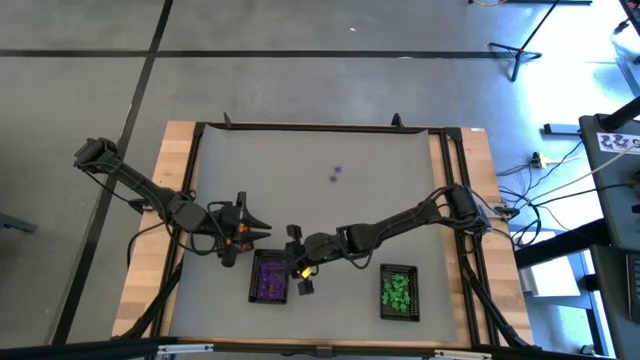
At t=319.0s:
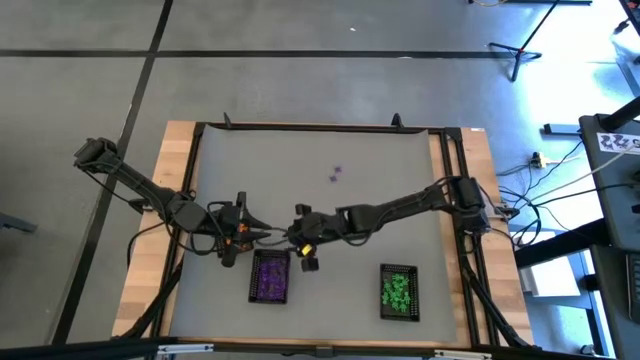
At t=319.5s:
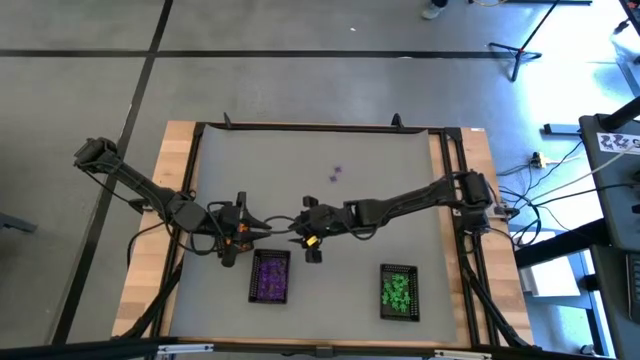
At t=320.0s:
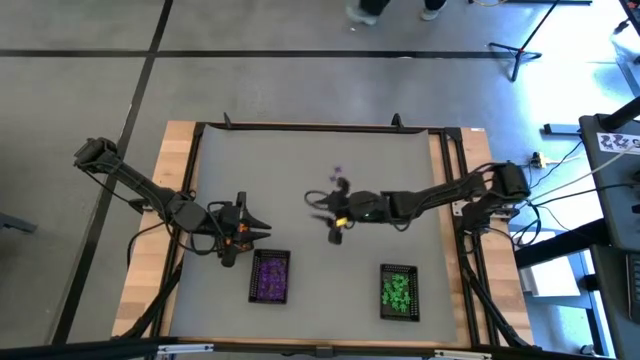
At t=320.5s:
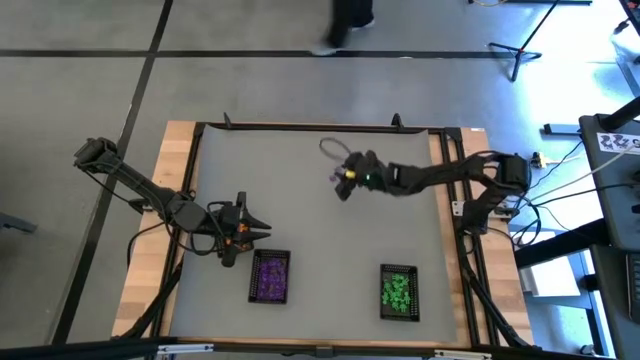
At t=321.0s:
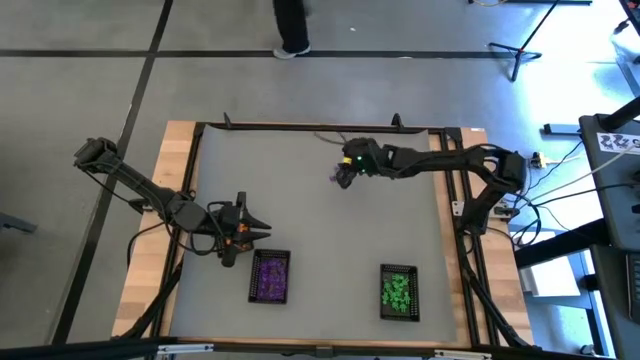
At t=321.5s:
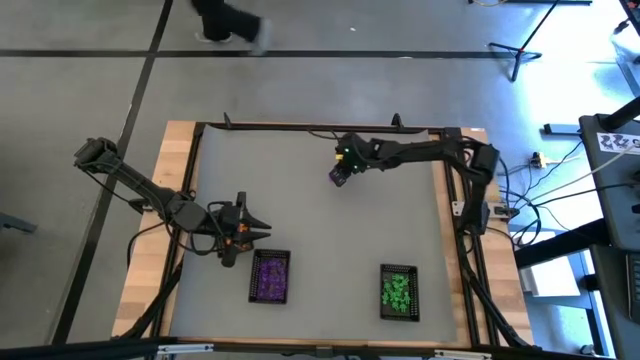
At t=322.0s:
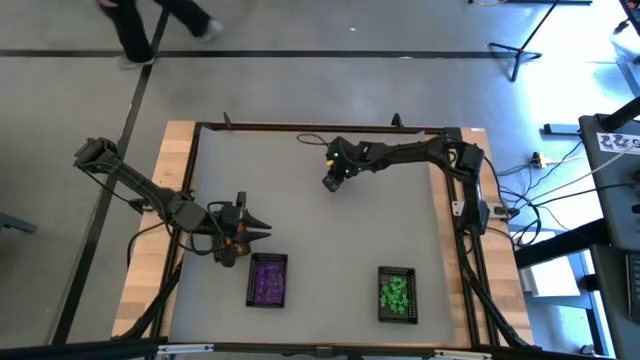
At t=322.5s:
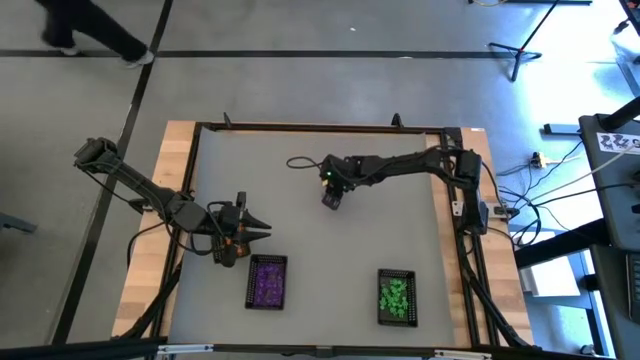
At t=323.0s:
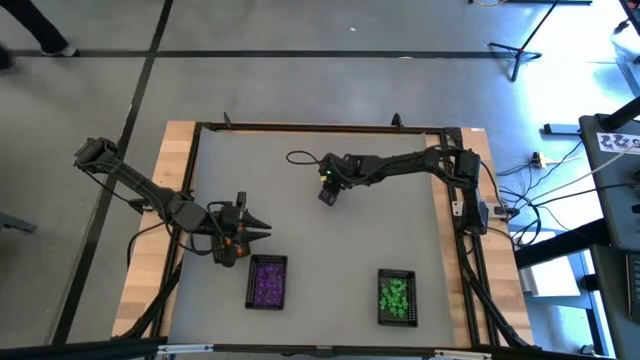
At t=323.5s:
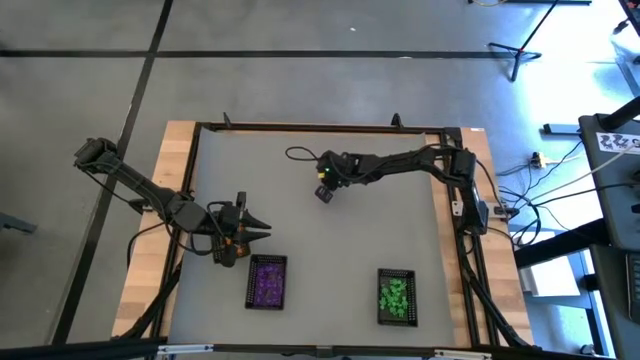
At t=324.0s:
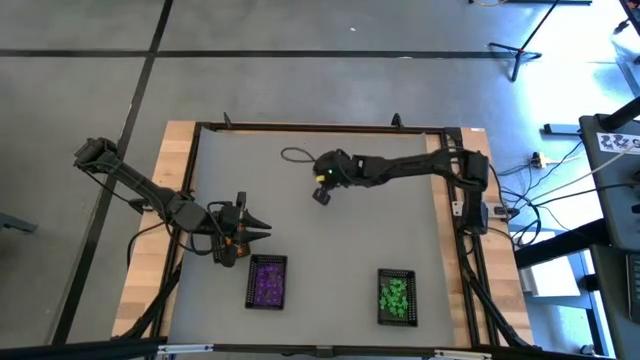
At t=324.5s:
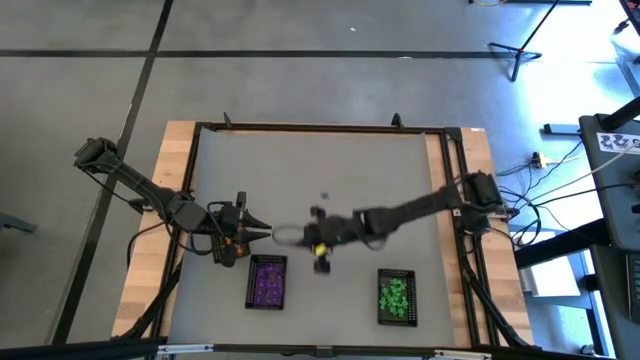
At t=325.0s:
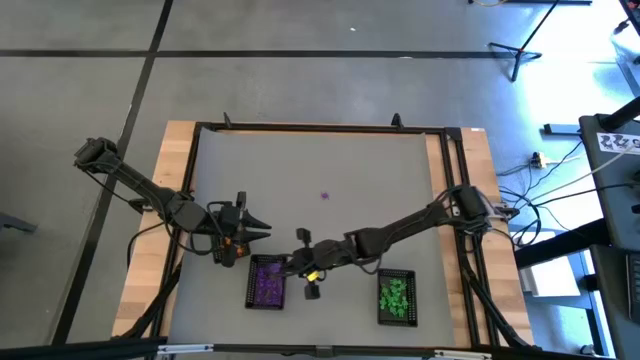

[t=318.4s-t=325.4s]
Task: Sort Halloween decoration
Put the purple spider toy into the bottom left black basket

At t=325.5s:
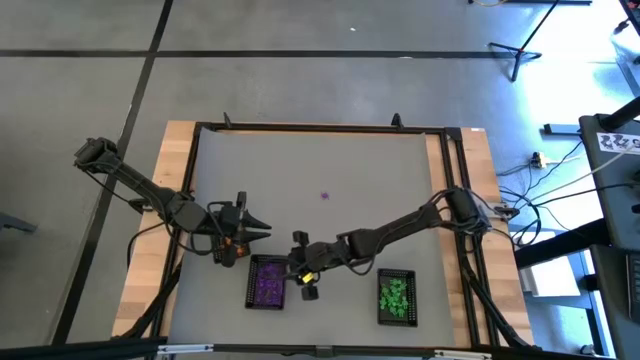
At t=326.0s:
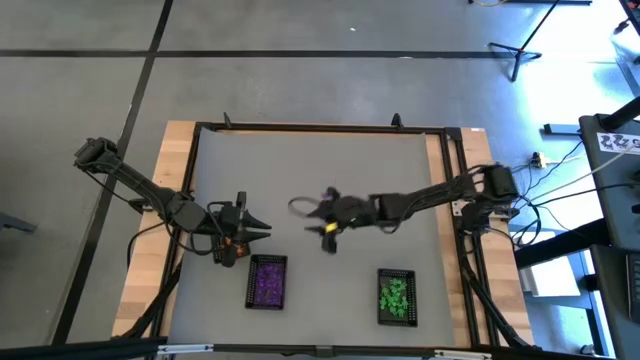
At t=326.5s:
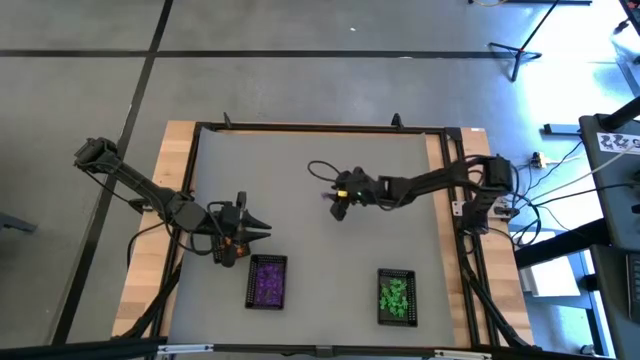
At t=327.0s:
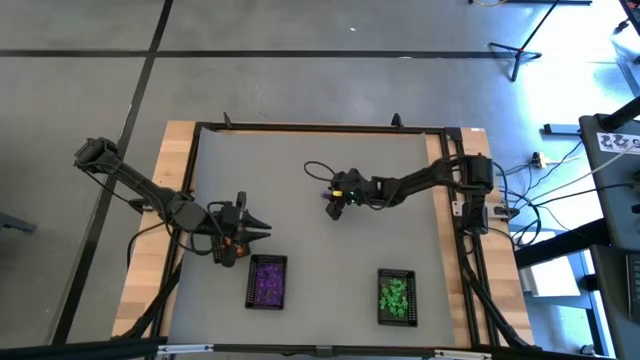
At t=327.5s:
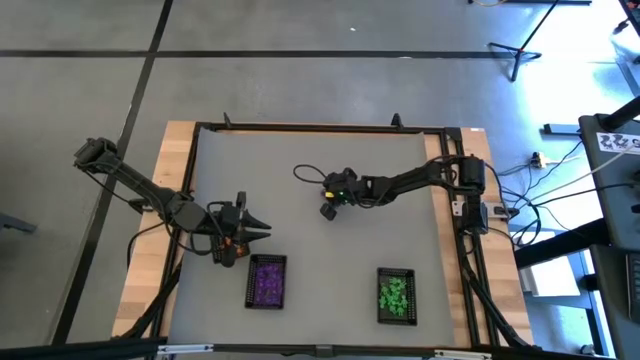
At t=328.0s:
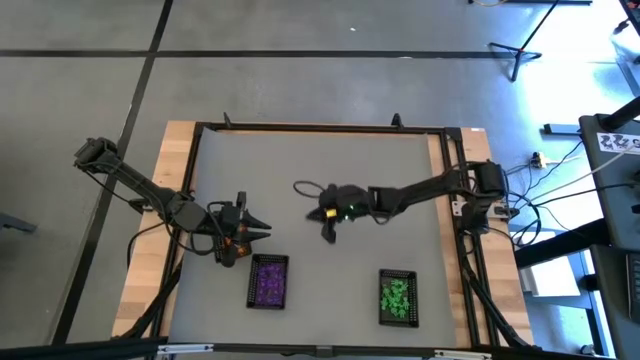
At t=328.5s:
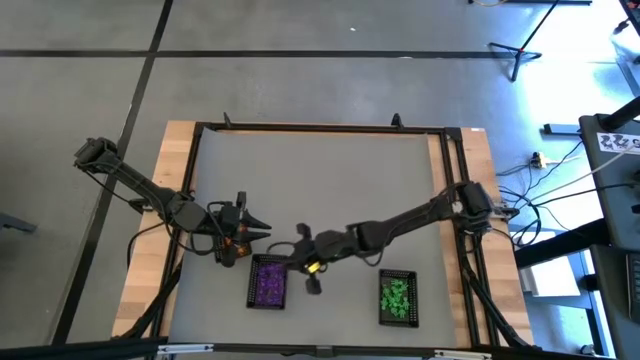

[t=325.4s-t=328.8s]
Put the purple spider toy into the bottom left black basket

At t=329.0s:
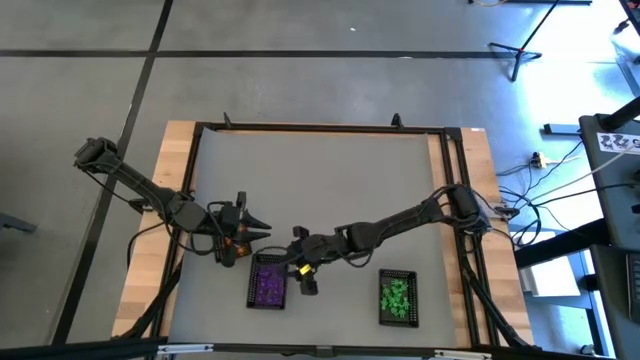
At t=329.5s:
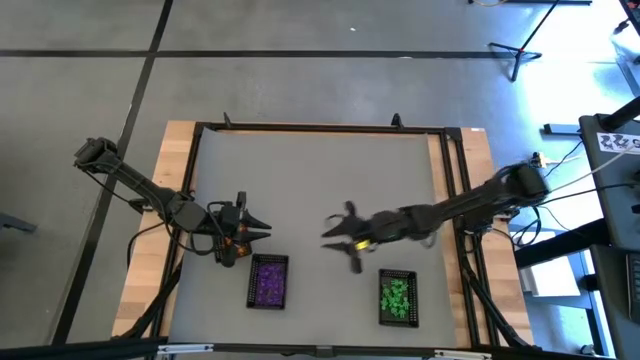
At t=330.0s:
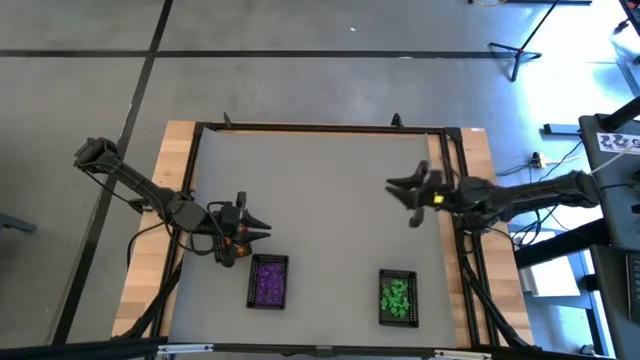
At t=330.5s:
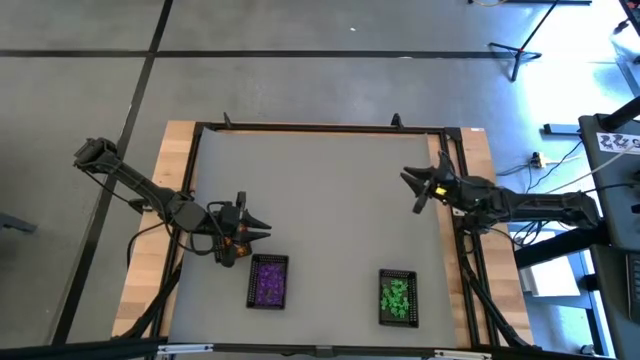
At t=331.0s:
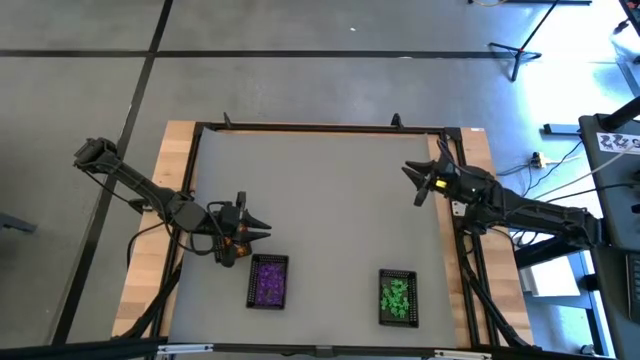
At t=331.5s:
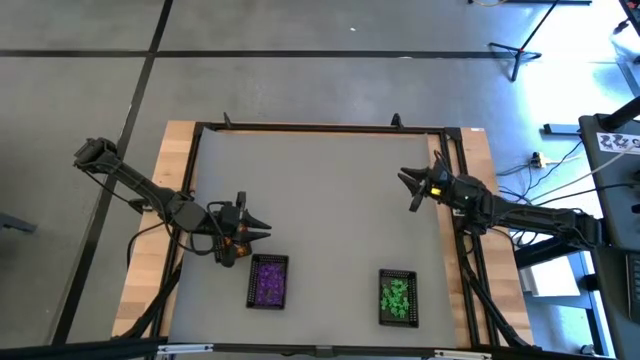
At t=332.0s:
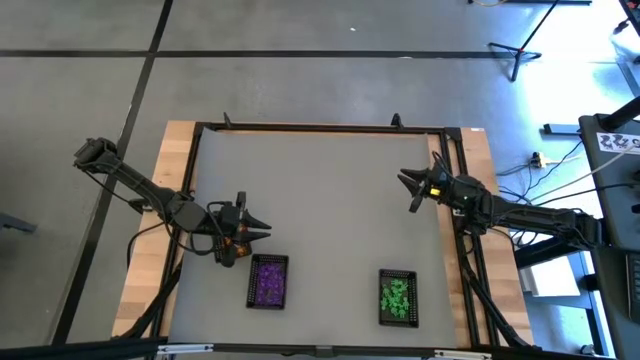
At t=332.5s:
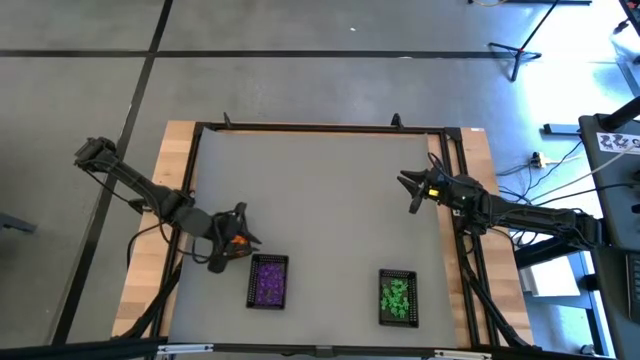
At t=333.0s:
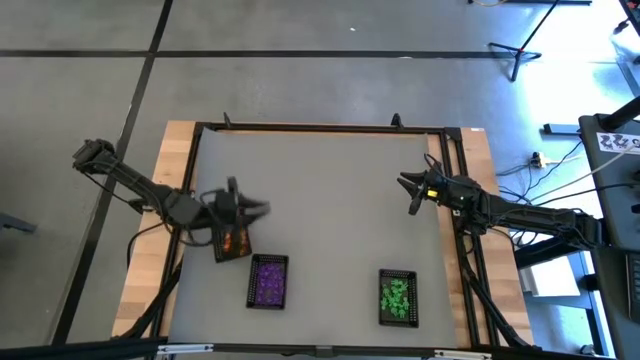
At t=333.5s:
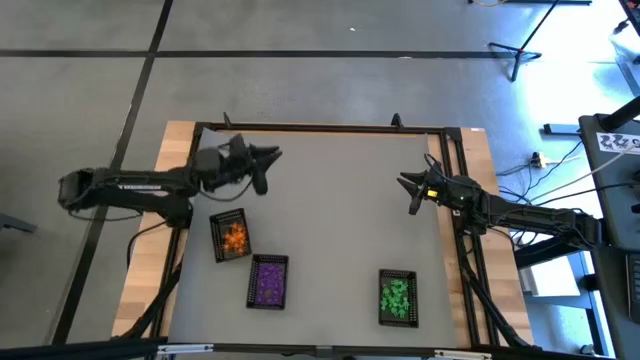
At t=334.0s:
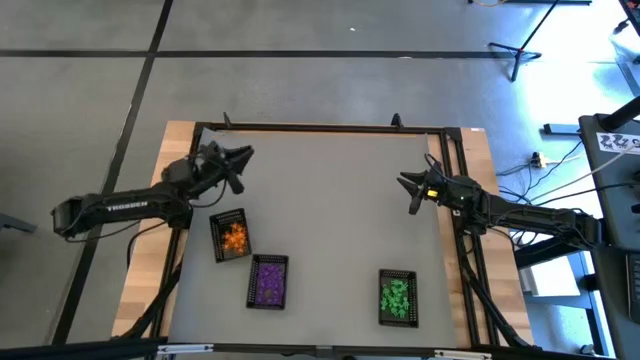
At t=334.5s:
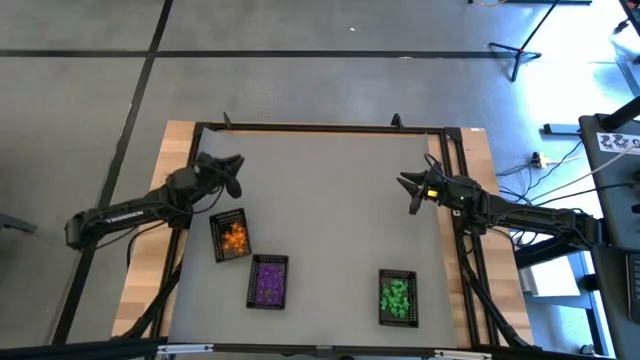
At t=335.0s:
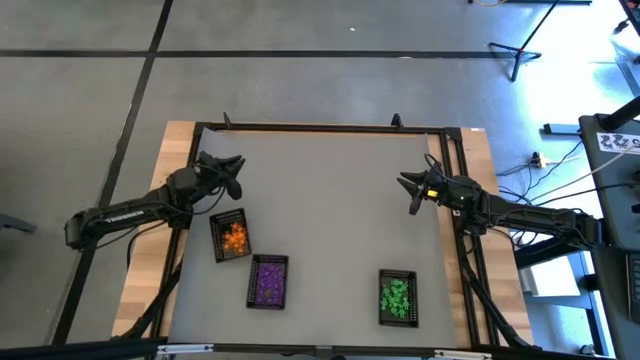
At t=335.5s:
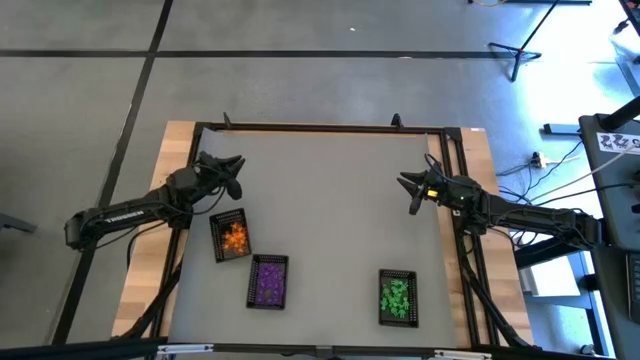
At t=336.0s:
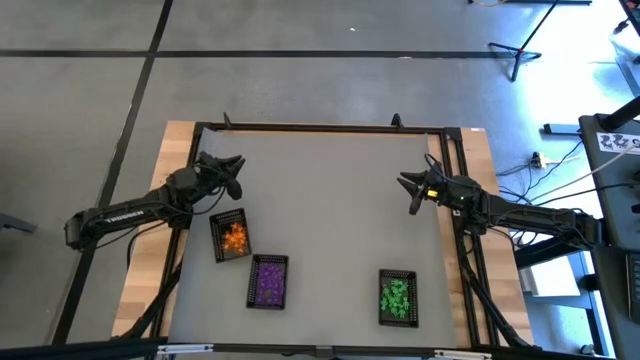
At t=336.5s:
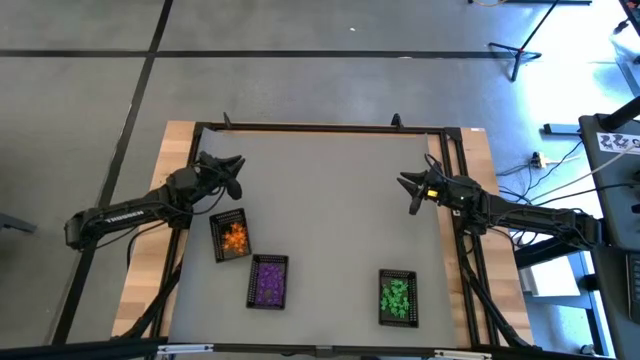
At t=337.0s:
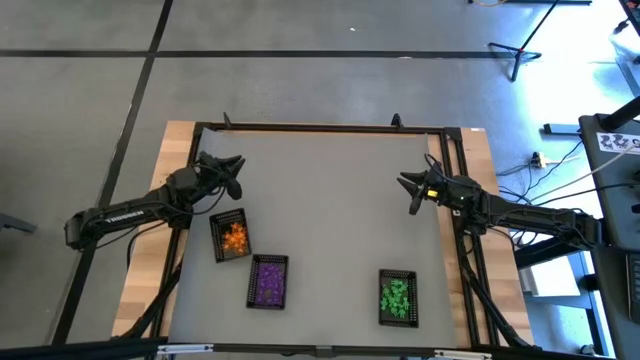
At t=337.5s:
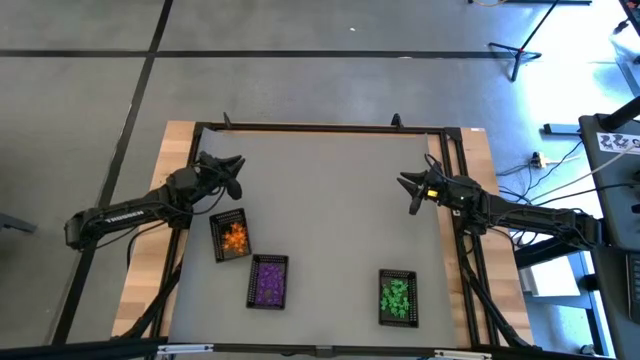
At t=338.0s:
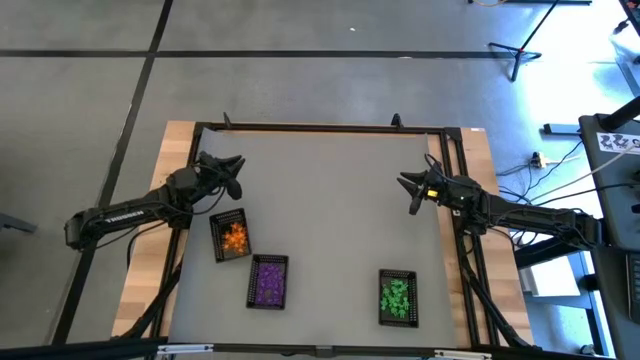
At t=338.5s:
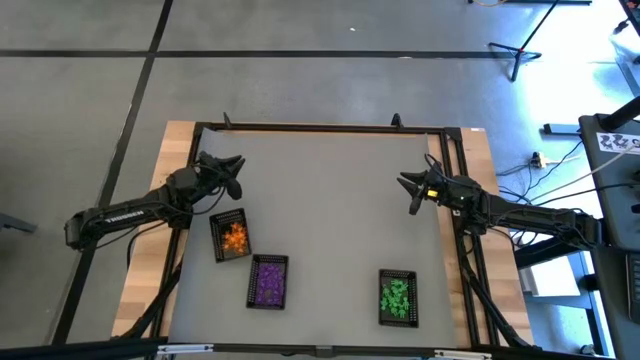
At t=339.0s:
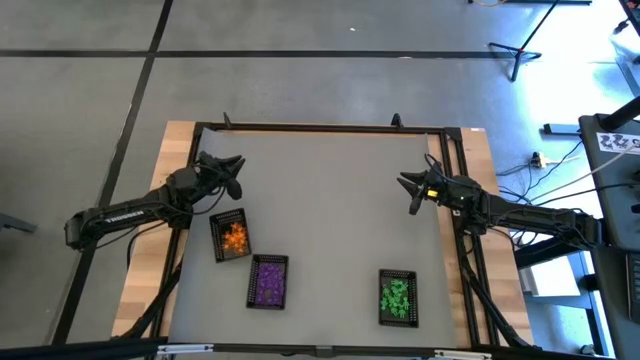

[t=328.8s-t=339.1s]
Return to Home Position

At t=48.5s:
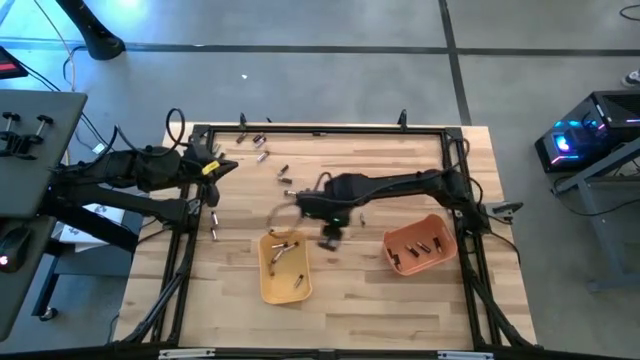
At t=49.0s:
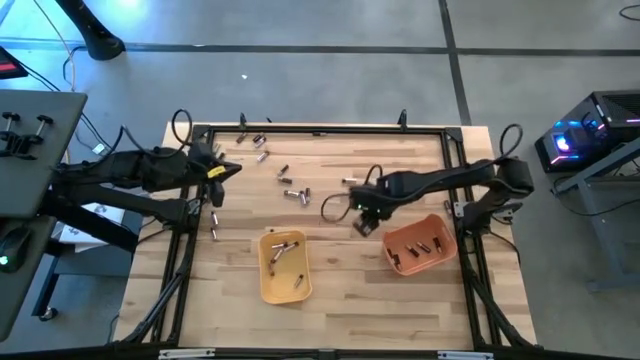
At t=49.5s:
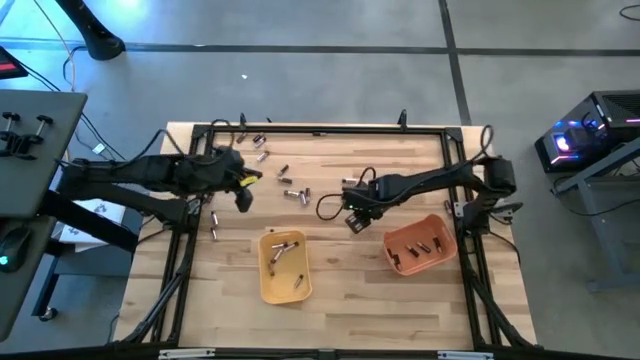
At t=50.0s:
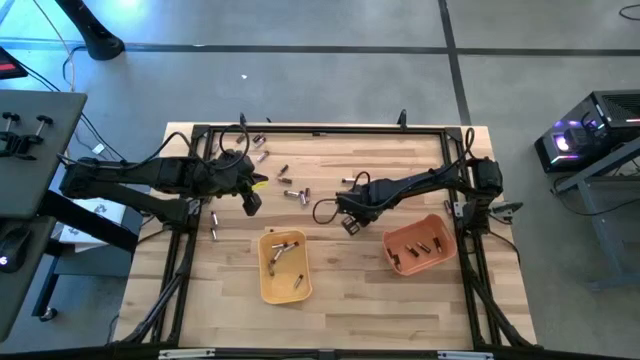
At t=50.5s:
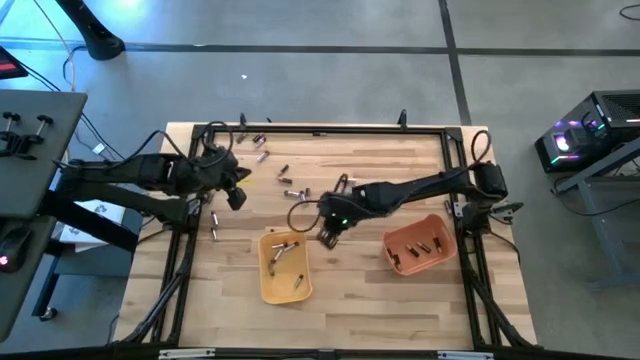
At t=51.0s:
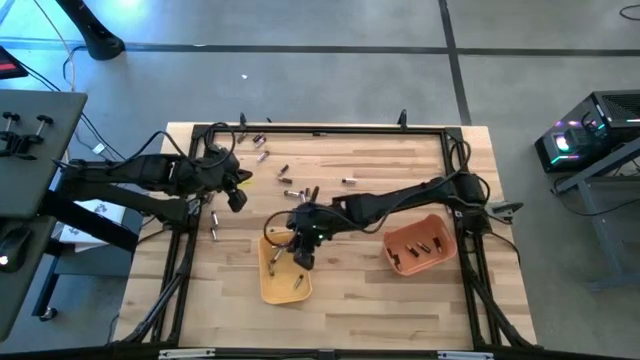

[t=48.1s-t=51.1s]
Task: Sort batteries
Put the silver battery into the yellow bin
